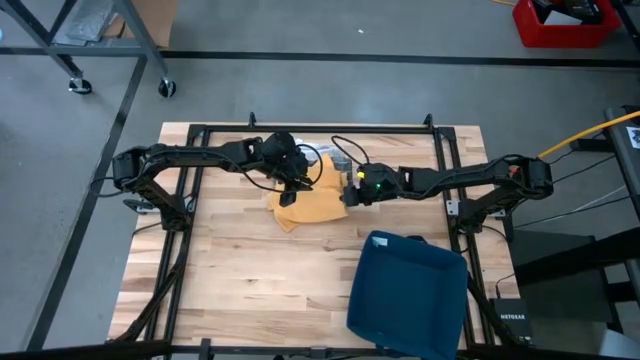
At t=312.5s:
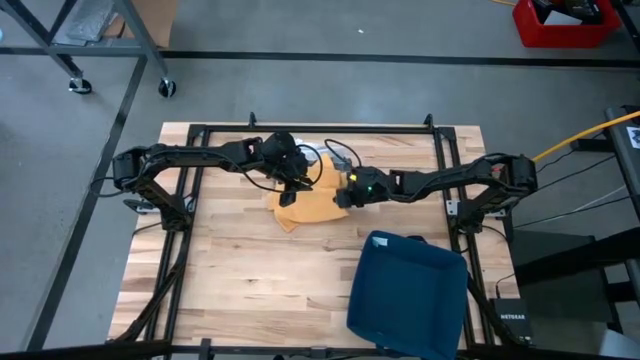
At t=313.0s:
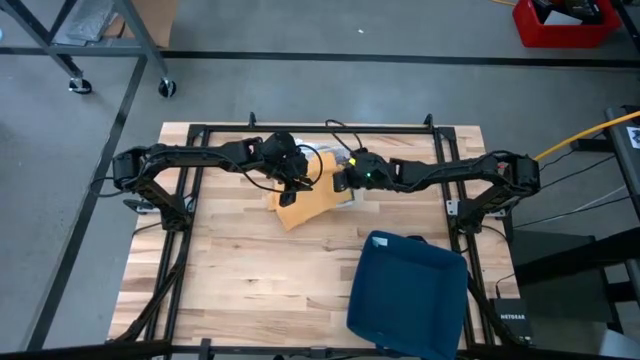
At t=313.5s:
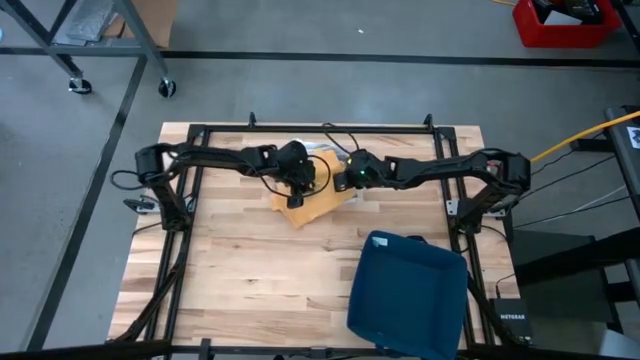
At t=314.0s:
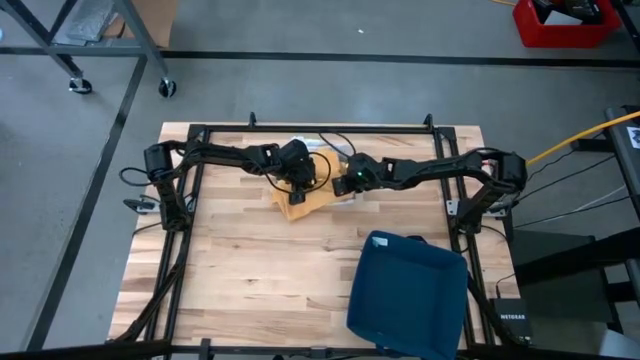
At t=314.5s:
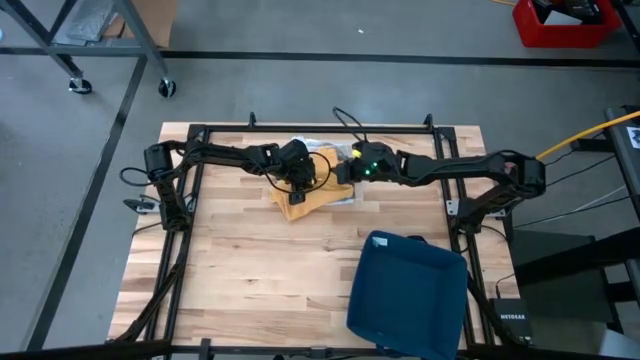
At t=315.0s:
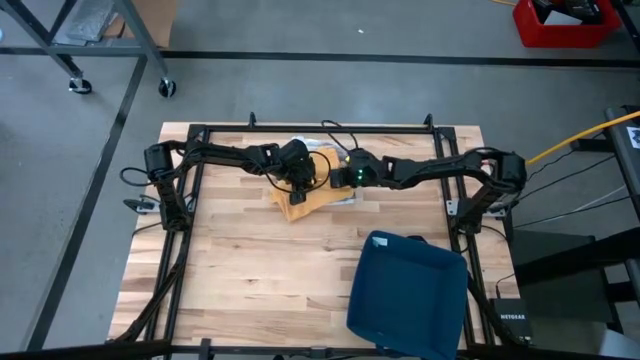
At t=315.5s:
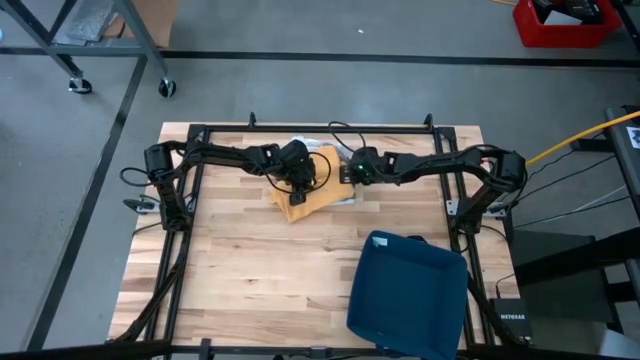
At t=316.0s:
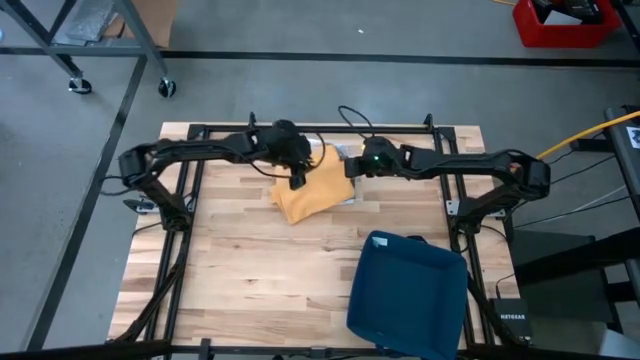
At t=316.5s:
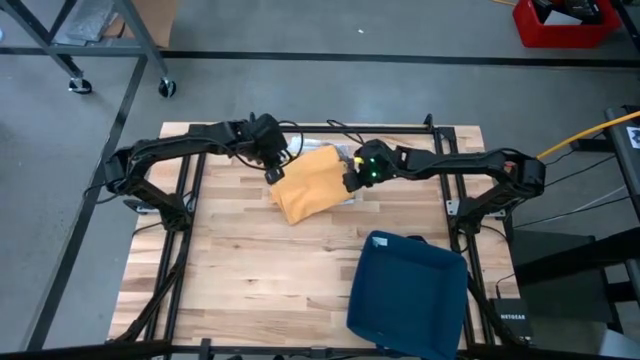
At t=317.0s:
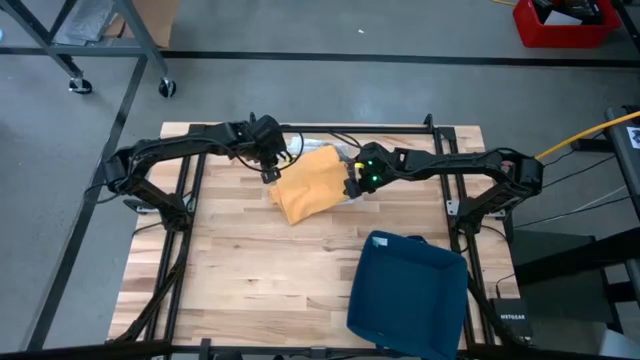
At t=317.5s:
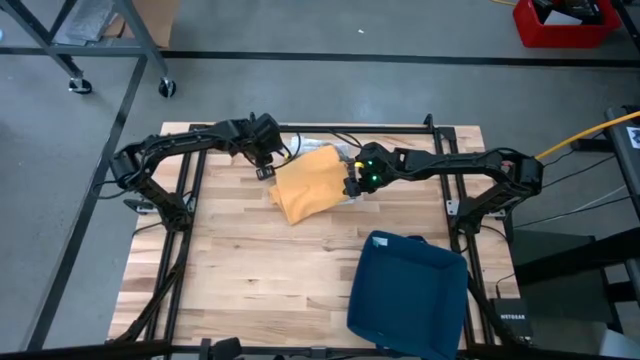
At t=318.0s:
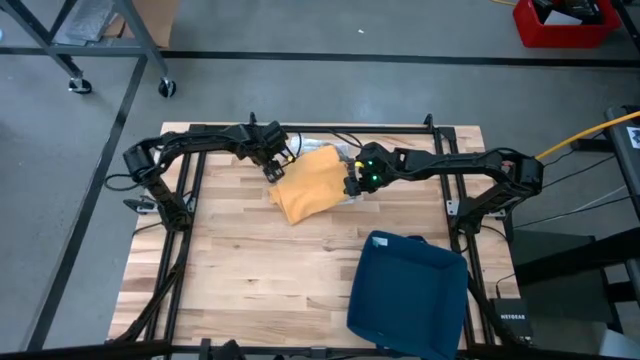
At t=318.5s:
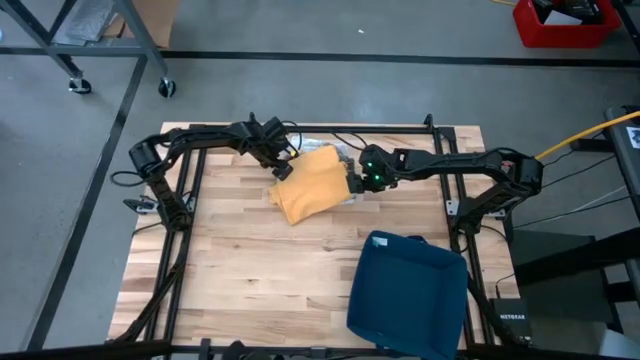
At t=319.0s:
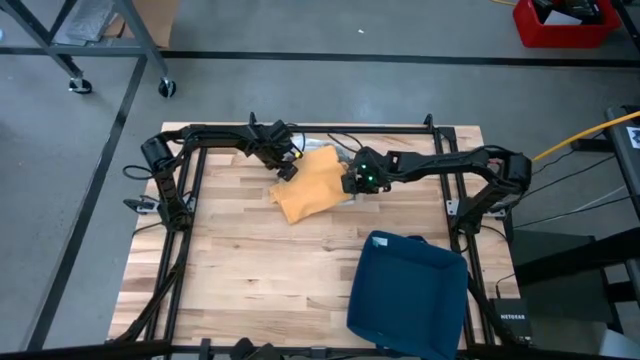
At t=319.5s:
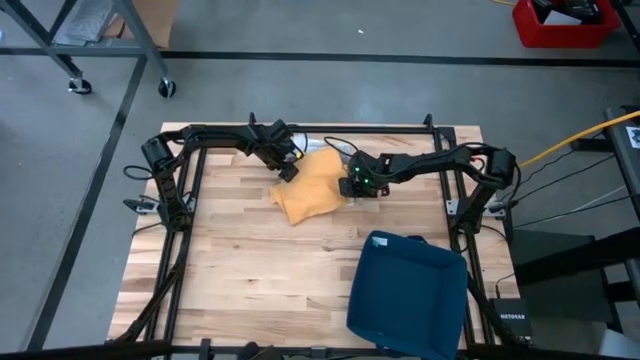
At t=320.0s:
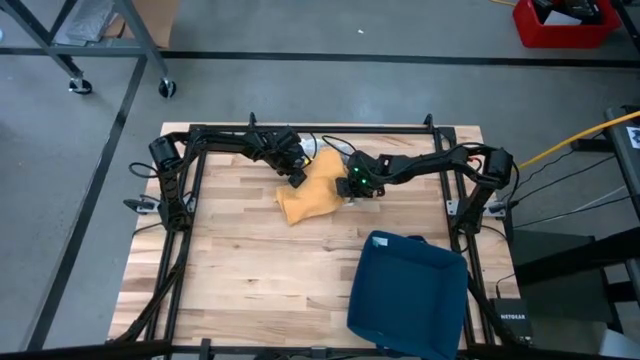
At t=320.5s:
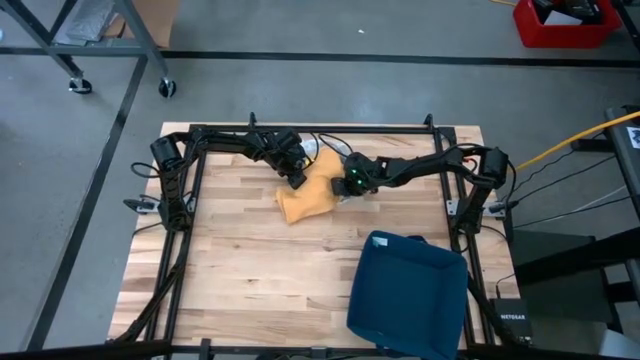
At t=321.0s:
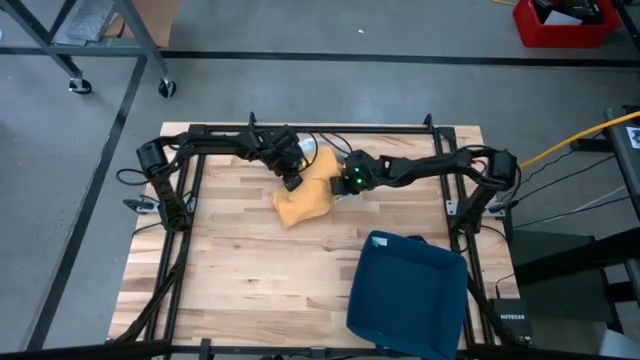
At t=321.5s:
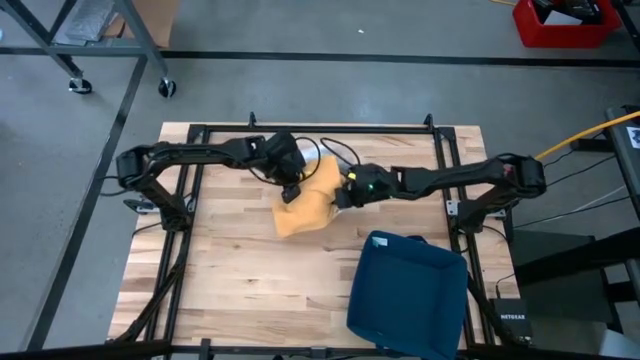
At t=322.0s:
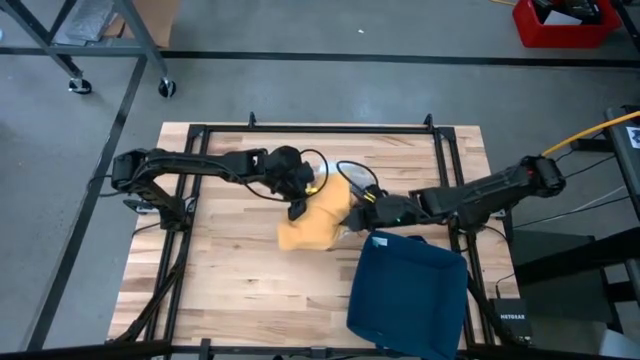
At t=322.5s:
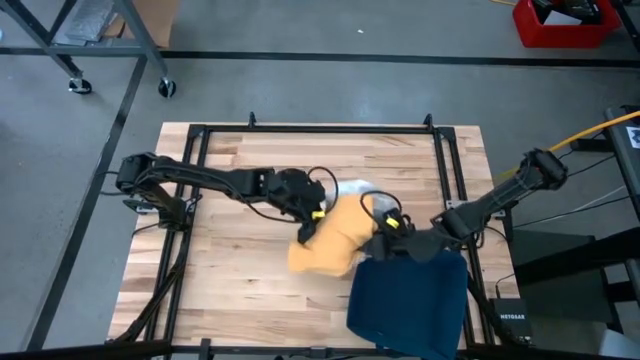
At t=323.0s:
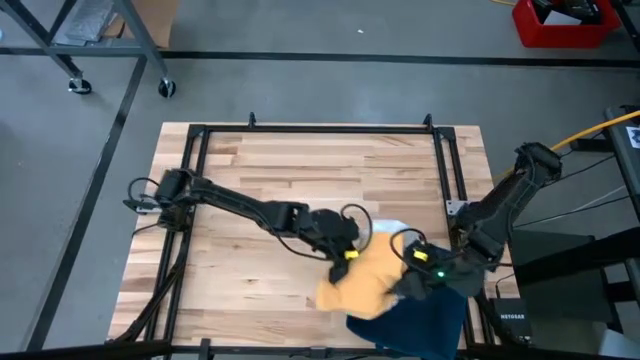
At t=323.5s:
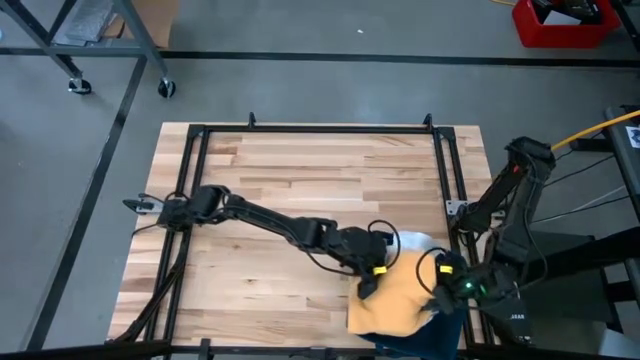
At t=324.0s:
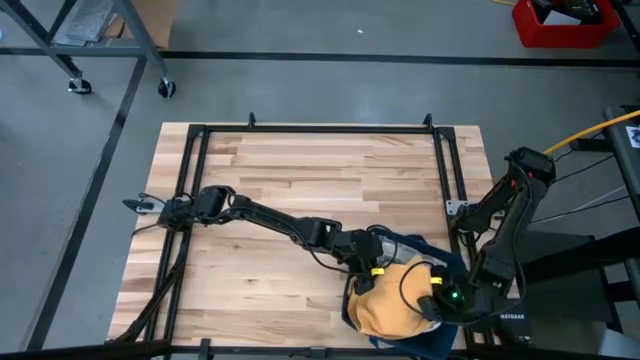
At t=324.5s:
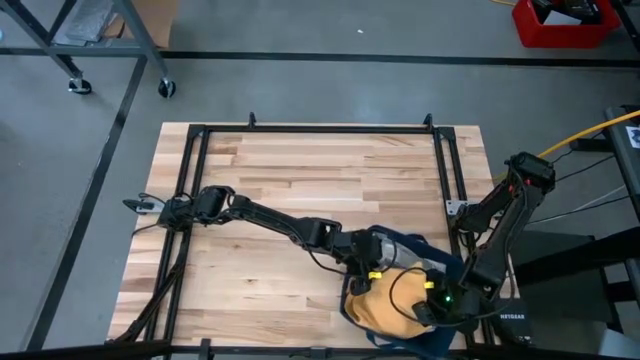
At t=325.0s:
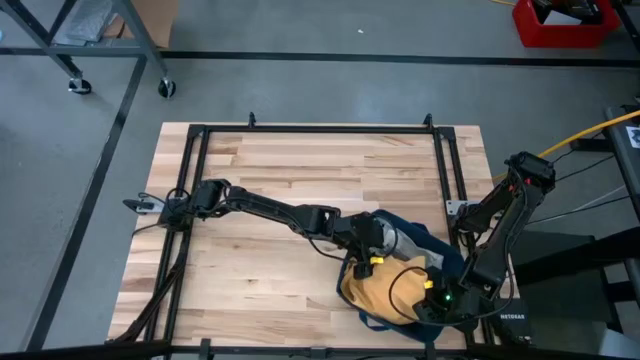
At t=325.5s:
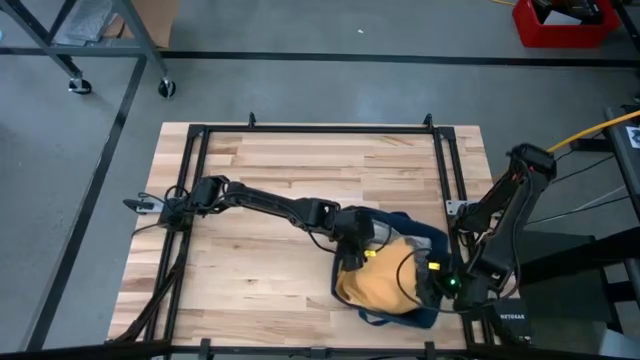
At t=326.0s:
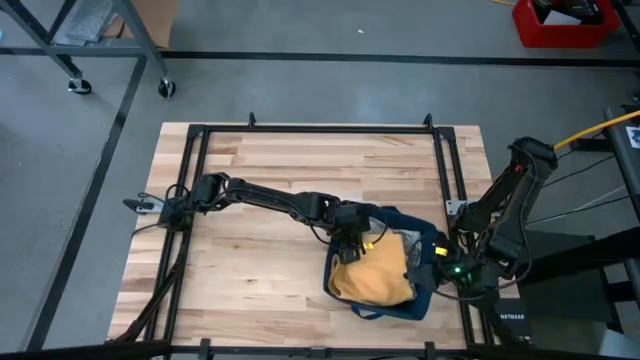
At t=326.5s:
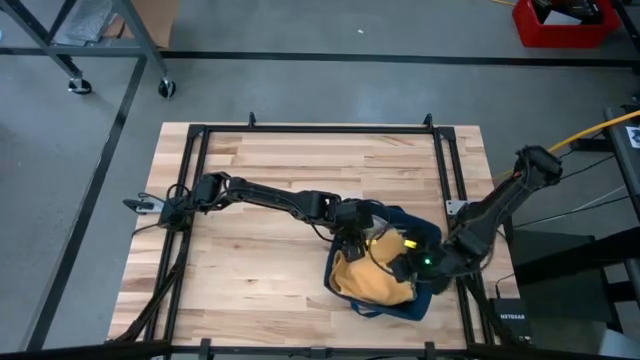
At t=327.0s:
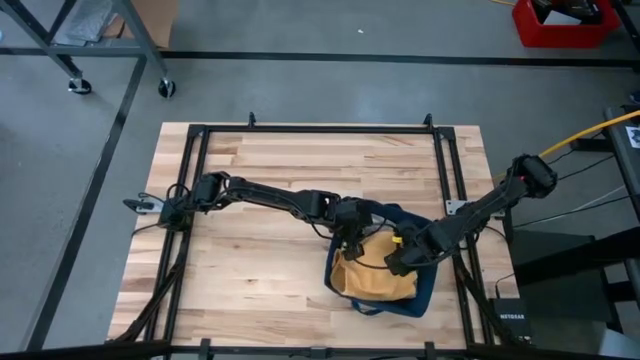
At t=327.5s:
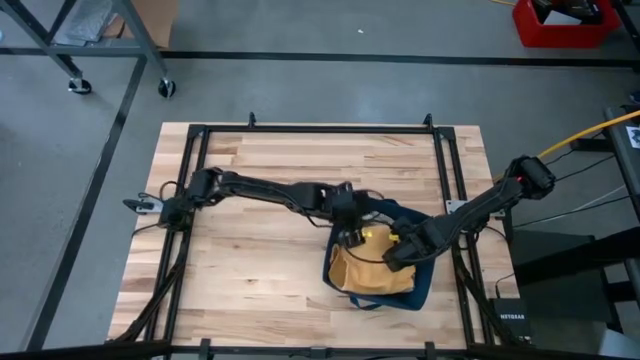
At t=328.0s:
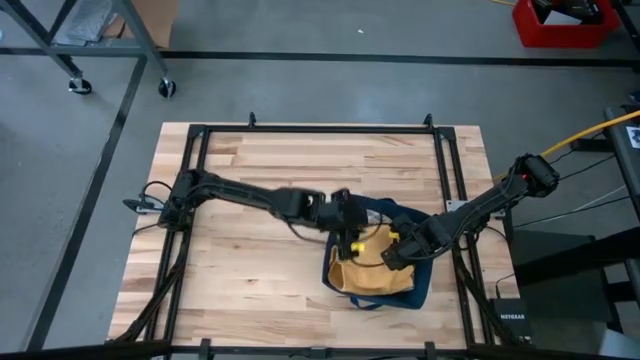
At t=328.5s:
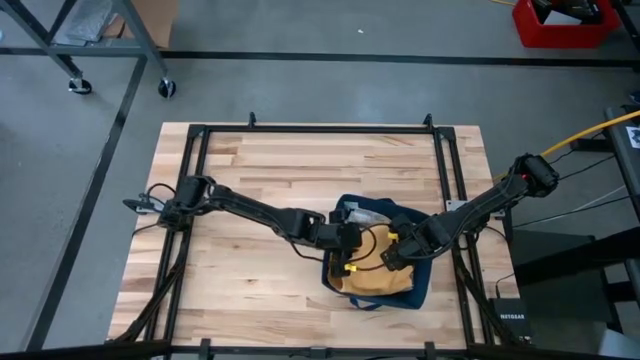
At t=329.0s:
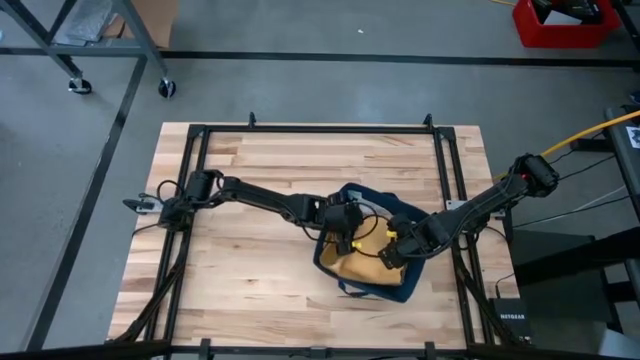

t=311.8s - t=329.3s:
Task: Fold towel
Put the stack of towels into the blue bin
